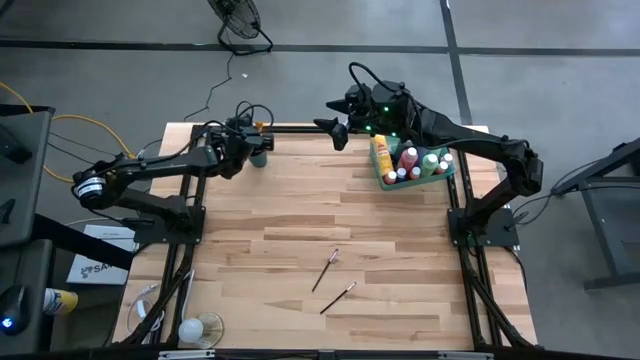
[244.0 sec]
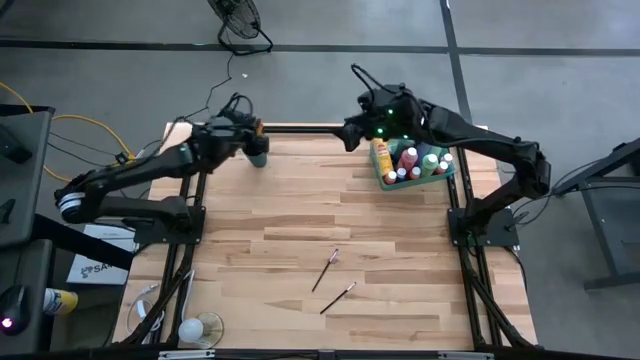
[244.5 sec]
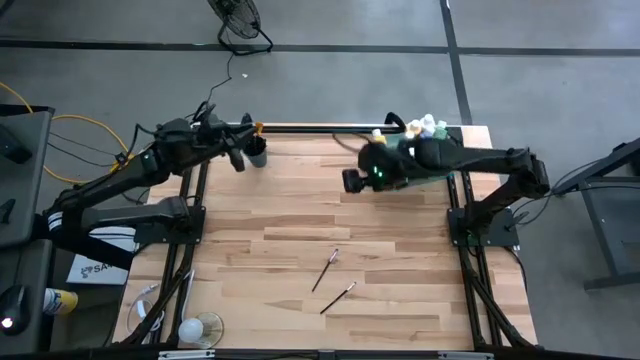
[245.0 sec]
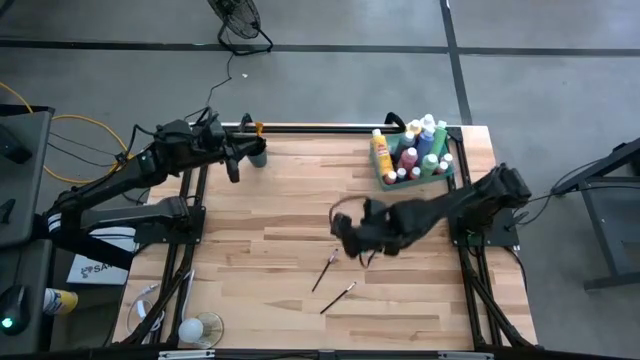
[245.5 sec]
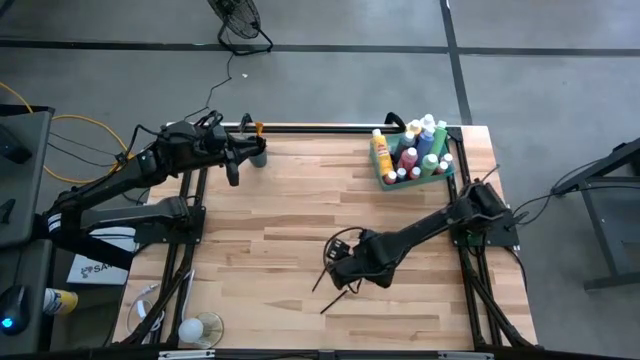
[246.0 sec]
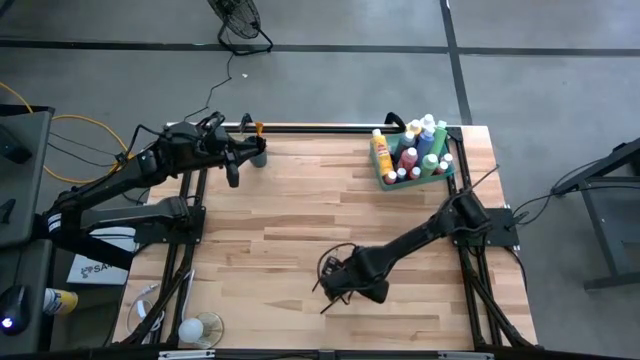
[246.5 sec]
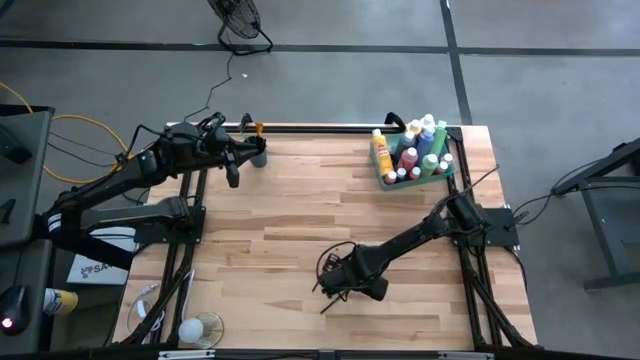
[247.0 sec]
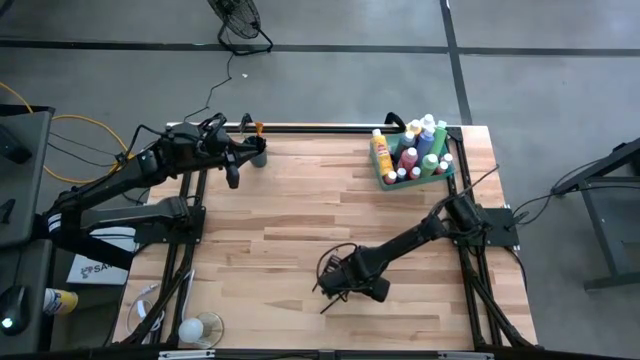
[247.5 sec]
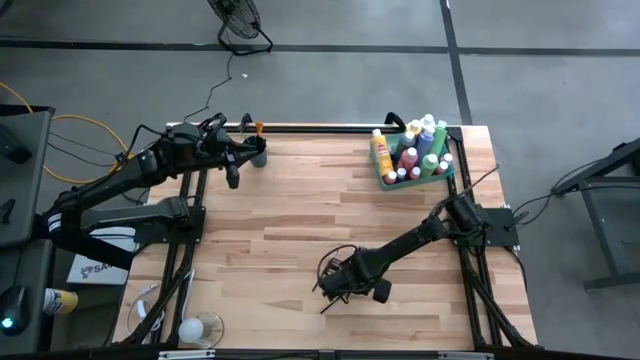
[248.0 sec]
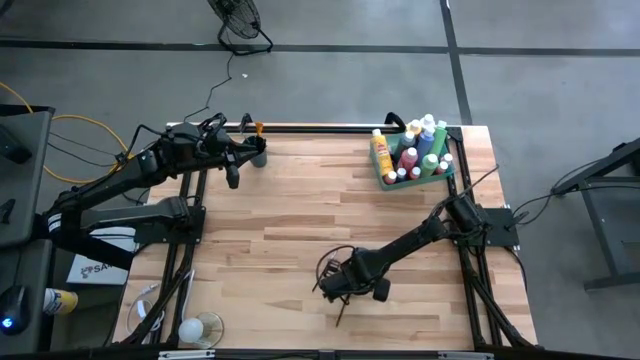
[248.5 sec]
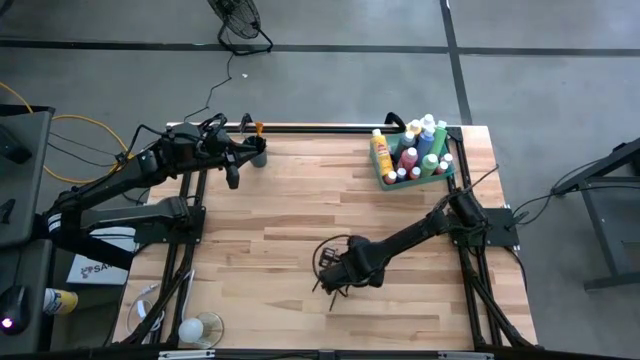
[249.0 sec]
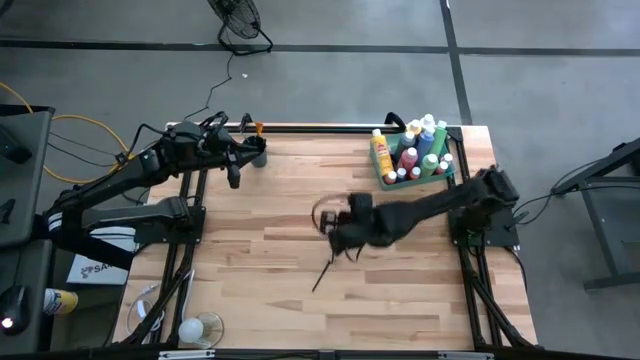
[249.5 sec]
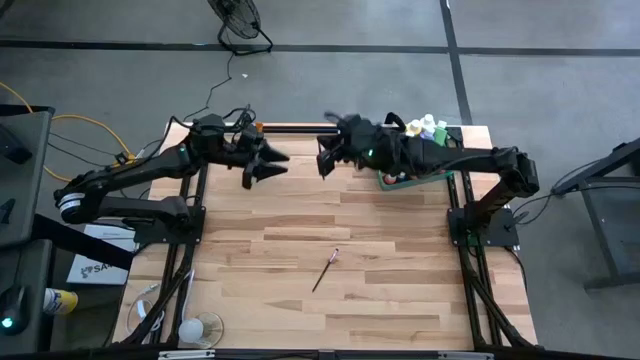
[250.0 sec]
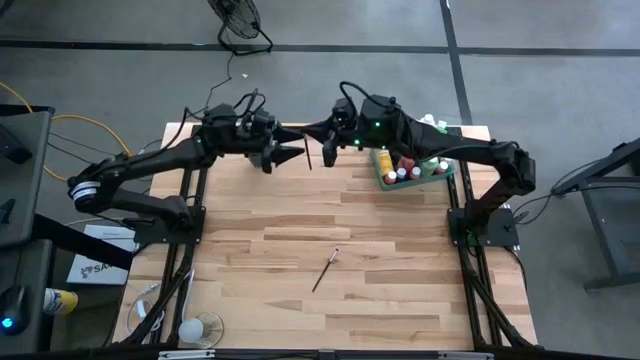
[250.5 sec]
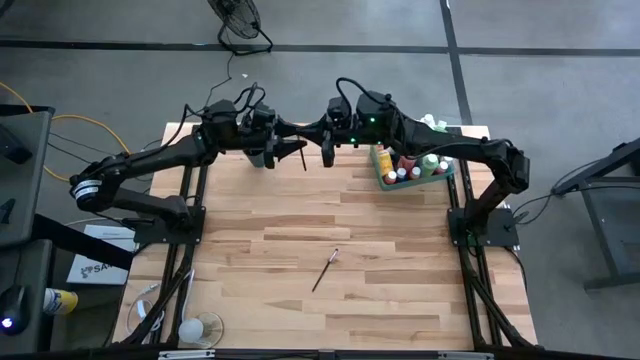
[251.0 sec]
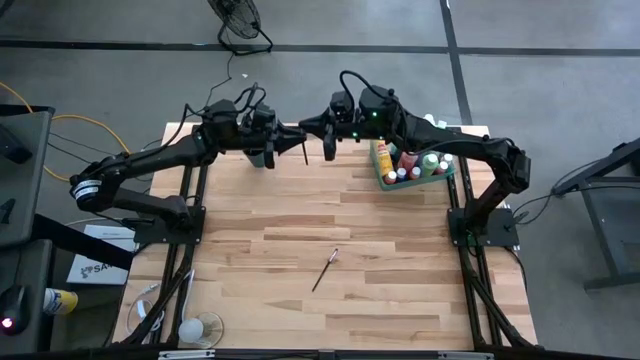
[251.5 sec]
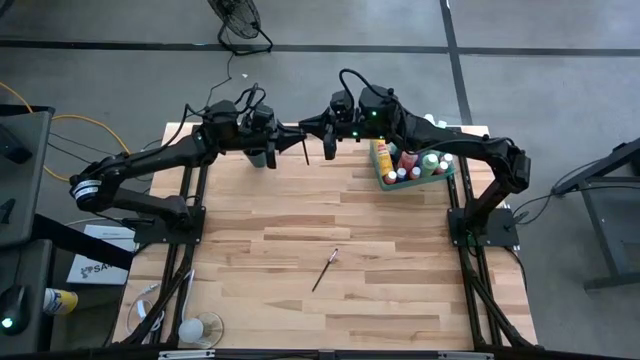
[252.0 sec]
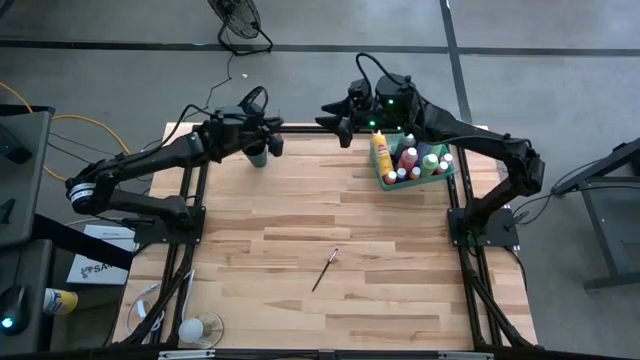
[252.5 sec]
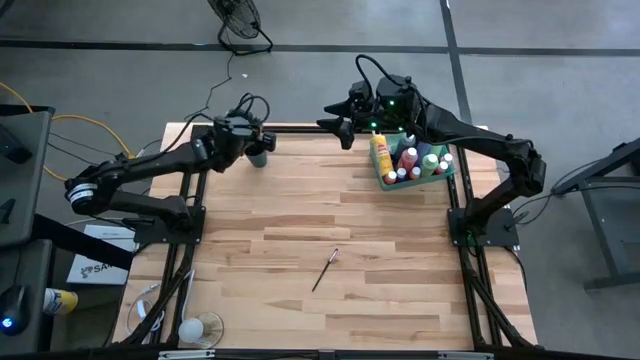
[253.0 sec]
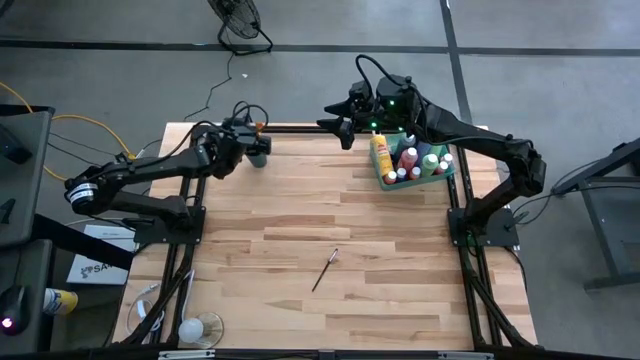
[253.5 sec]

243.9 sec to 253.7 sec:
Task: Pick & Place Paint Supplies
Put the silver paintbrush into the blue cup

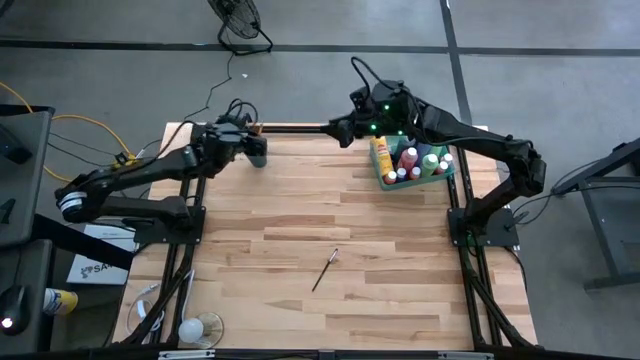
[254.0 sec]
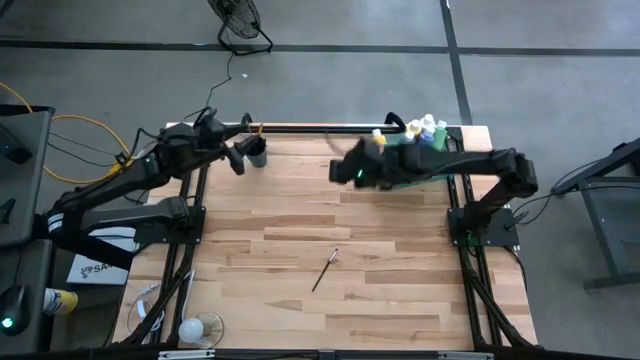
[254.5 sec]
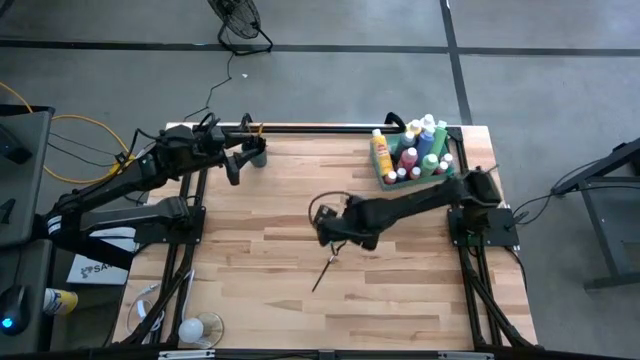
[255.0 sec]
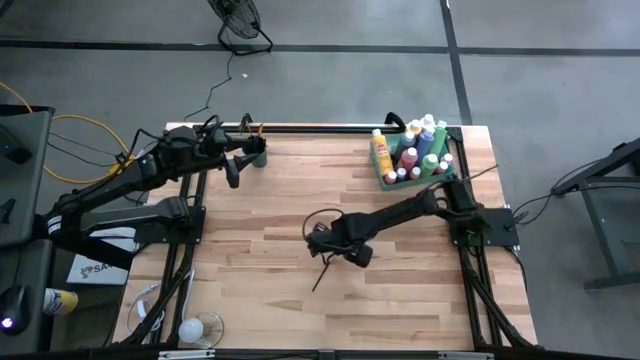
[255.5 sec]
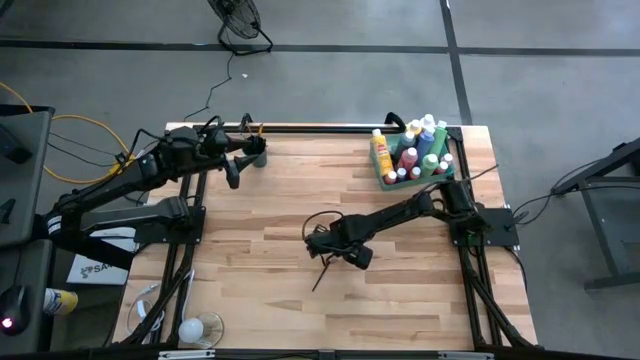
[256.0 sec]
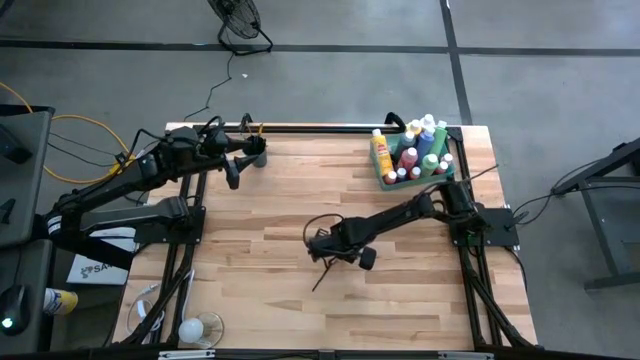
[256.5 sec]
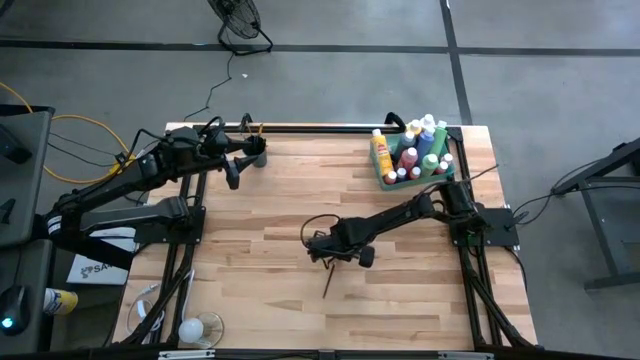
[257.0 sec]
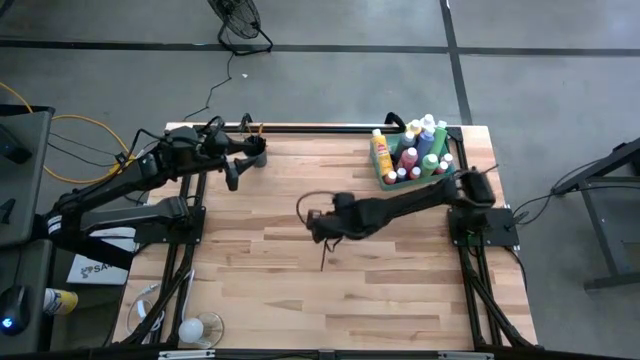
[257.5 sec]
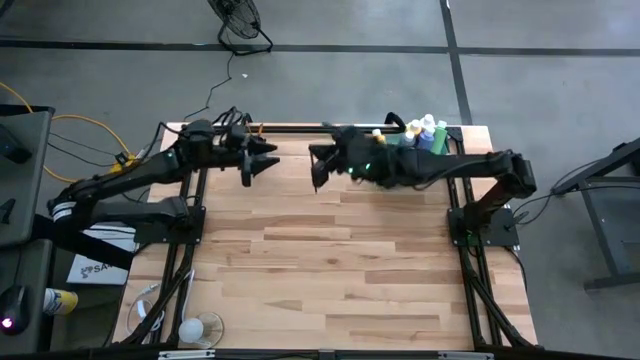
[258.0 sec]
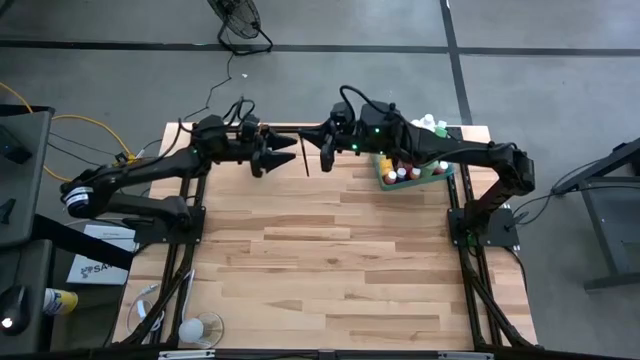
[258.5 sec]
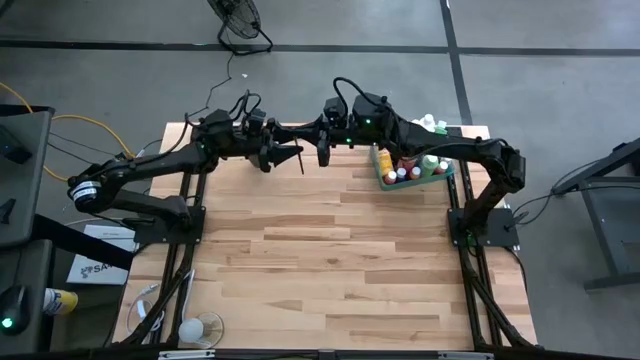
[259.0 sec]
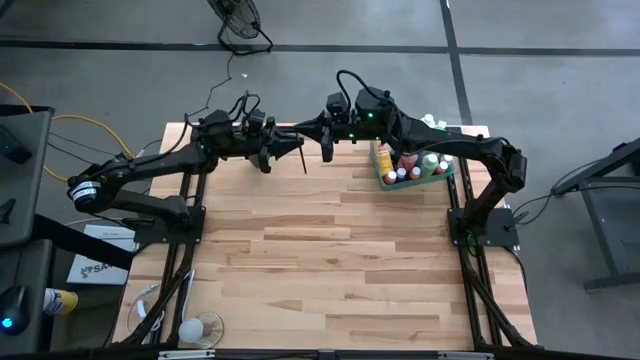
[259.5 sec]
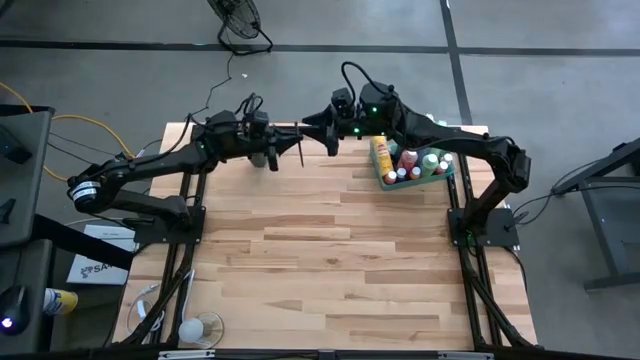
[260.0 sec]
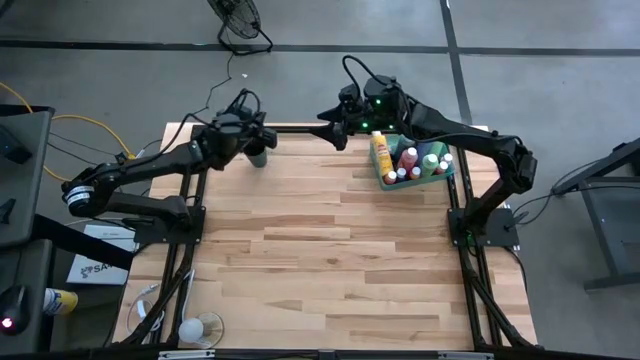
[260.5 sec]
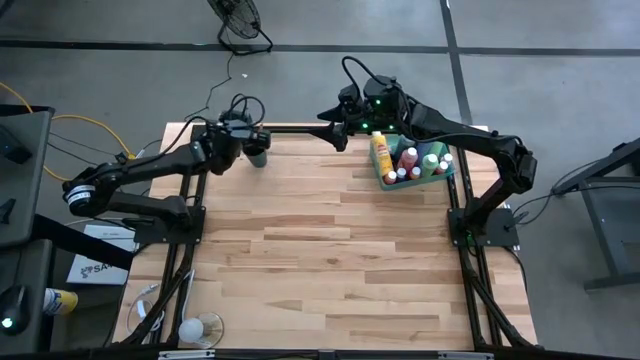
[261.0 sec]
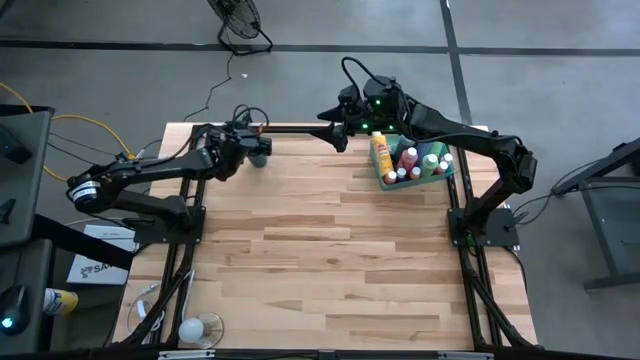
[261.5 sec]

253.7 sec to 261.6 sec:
Put the silver paintbrush into the blue cup

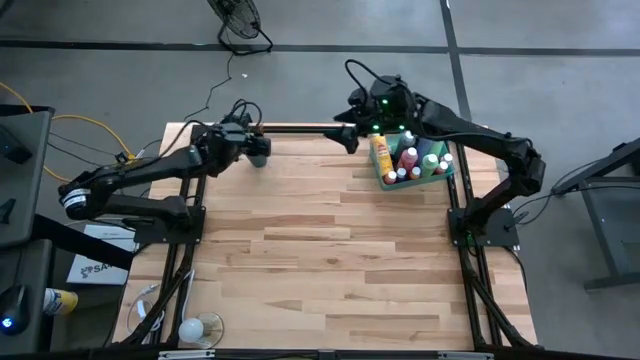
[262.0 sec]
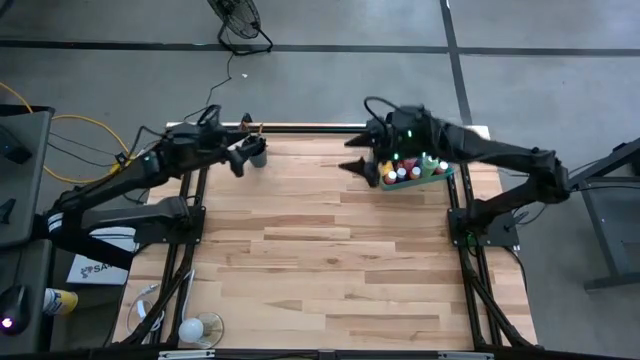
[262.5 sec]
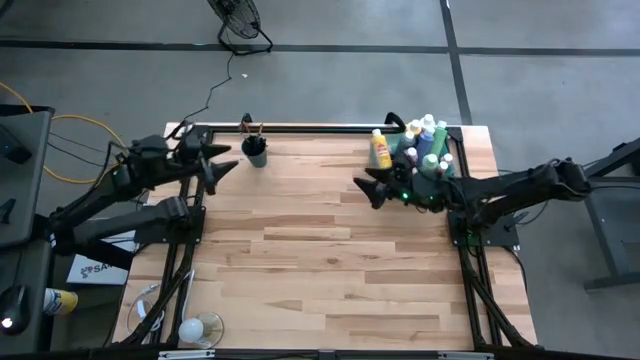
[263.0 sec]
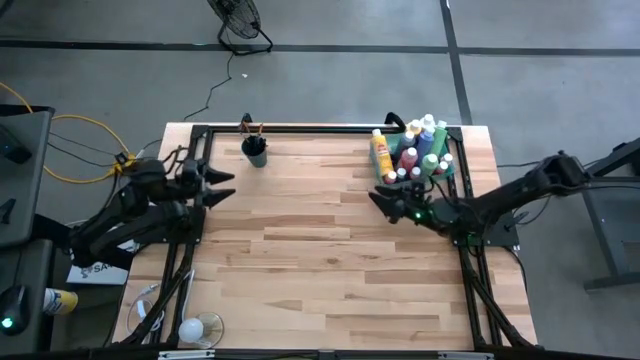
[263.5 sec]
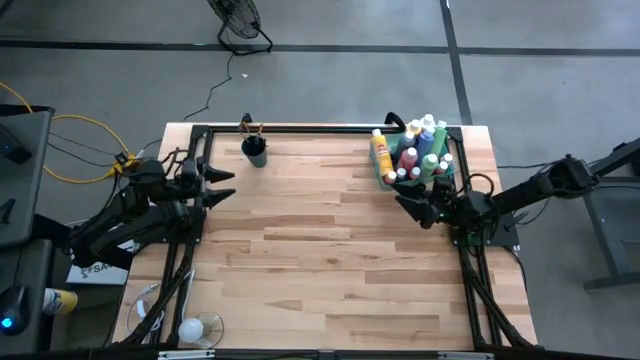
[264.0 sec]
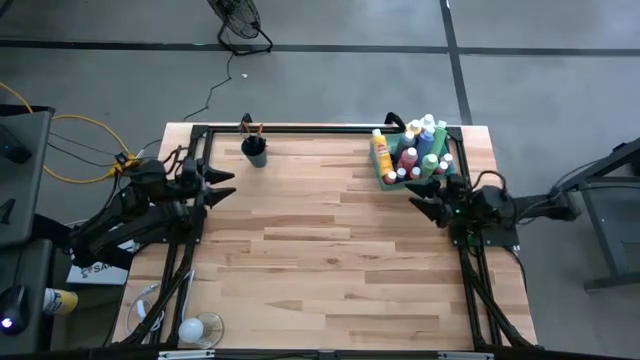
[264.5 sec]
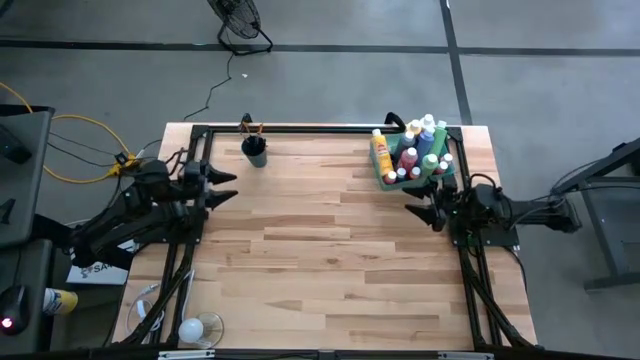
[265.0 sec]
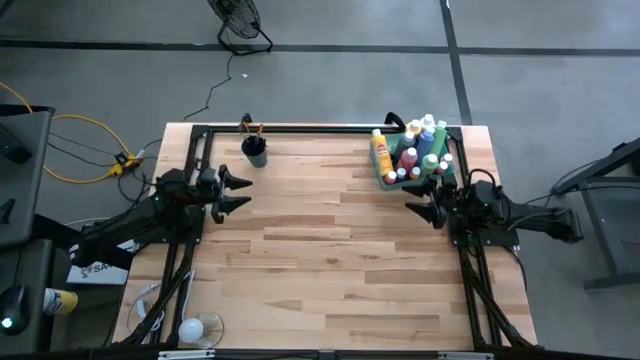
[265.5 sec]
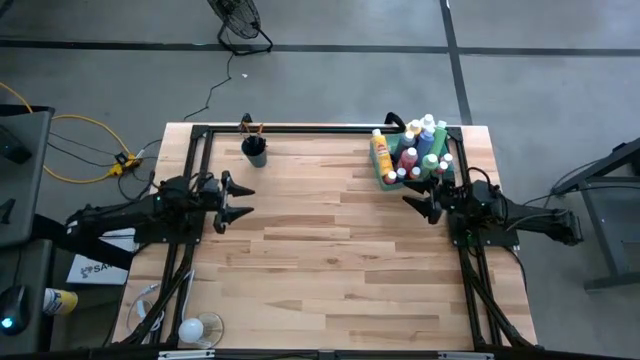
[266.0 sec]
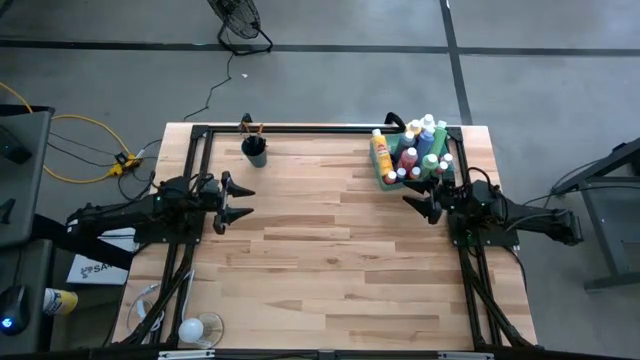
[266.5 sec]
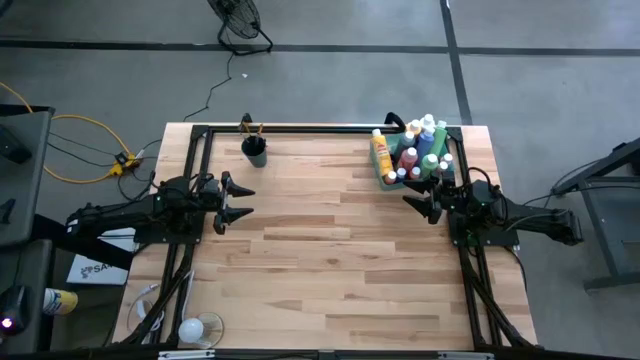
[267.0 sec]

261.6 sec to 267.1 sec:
Return to Home Position
